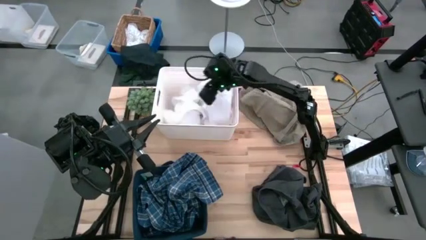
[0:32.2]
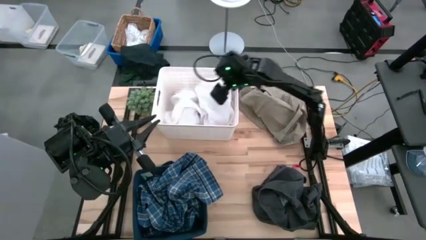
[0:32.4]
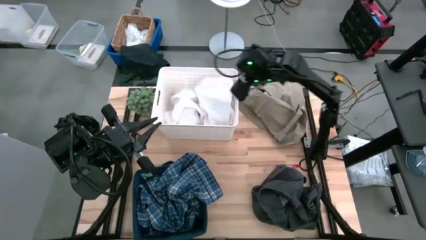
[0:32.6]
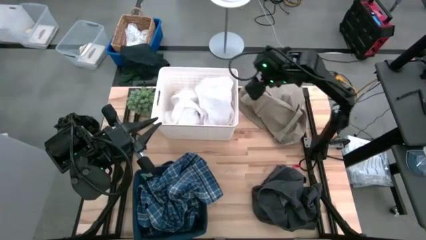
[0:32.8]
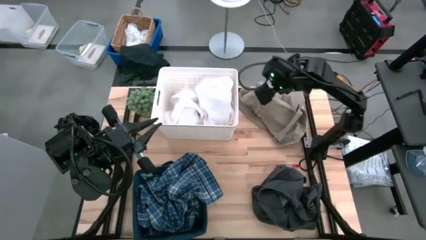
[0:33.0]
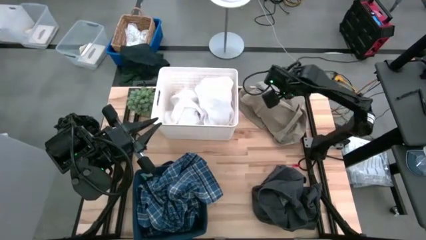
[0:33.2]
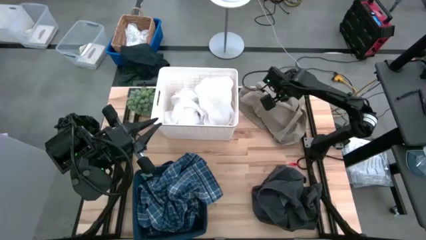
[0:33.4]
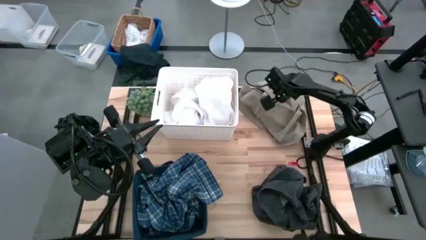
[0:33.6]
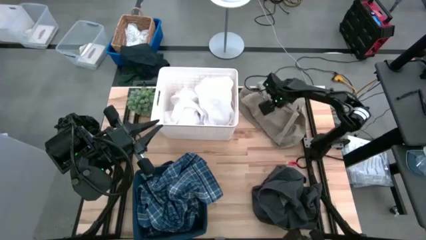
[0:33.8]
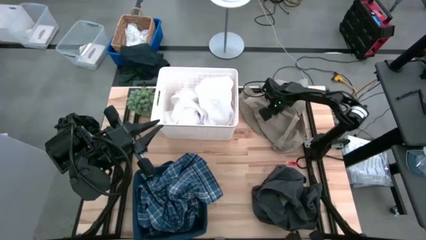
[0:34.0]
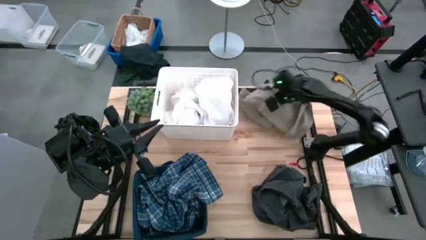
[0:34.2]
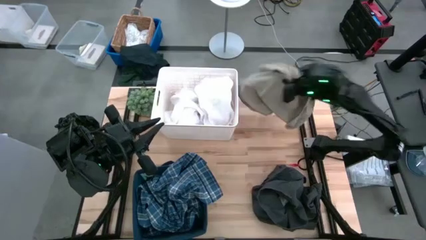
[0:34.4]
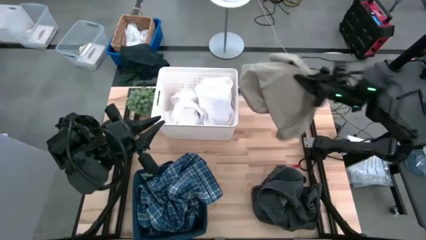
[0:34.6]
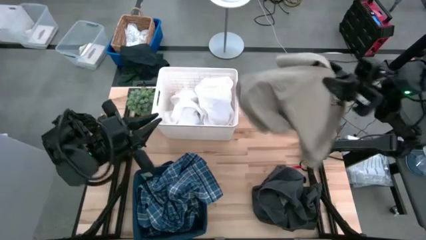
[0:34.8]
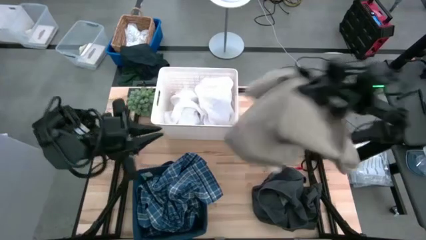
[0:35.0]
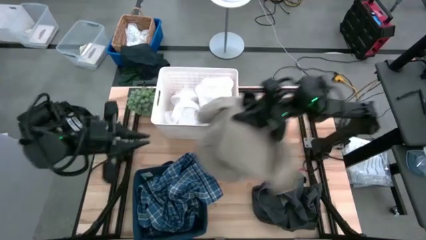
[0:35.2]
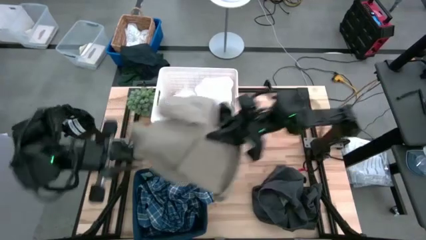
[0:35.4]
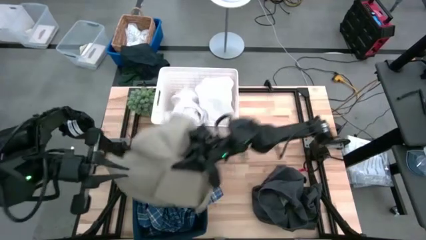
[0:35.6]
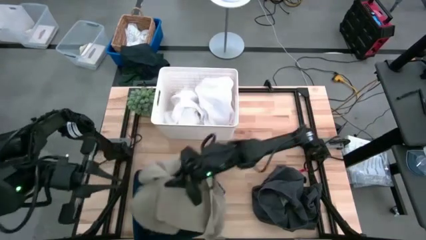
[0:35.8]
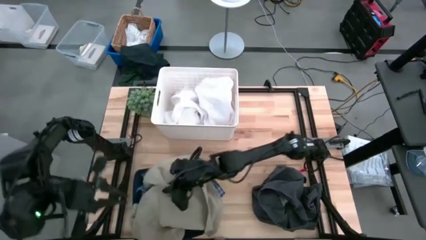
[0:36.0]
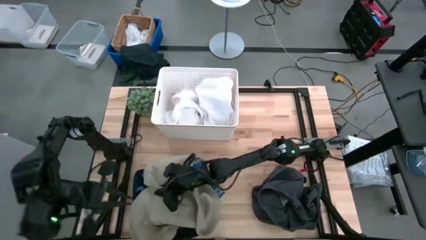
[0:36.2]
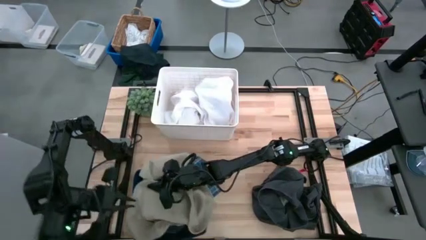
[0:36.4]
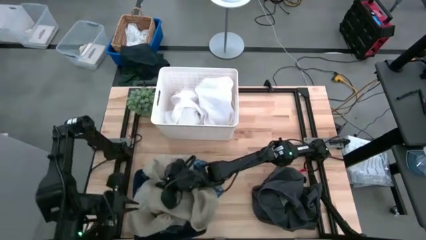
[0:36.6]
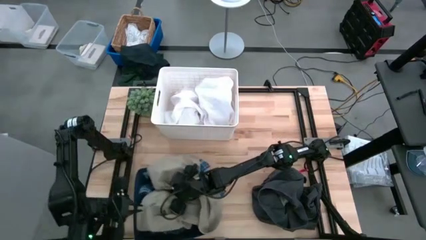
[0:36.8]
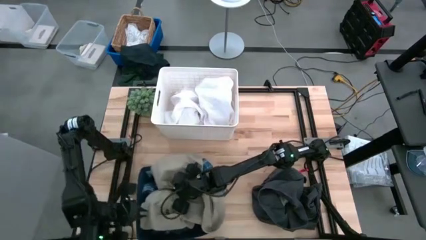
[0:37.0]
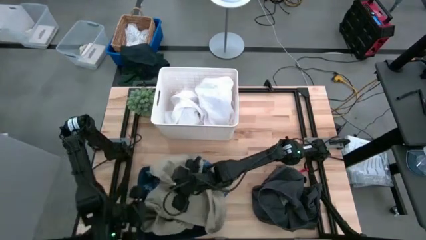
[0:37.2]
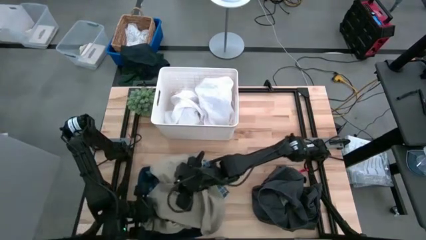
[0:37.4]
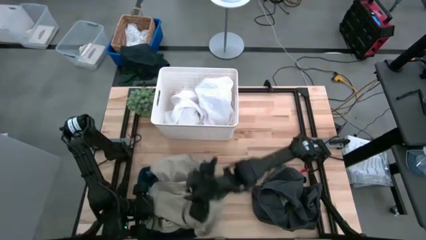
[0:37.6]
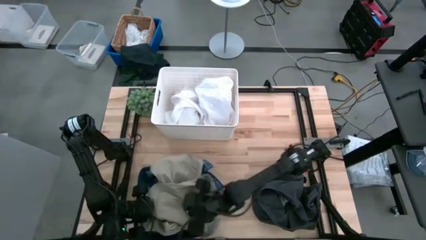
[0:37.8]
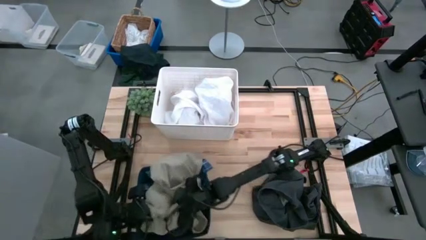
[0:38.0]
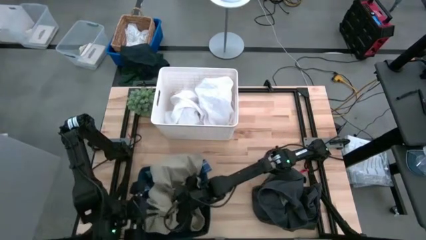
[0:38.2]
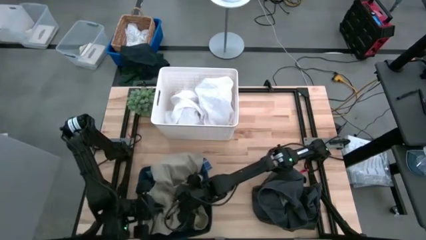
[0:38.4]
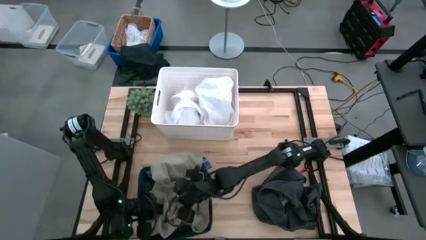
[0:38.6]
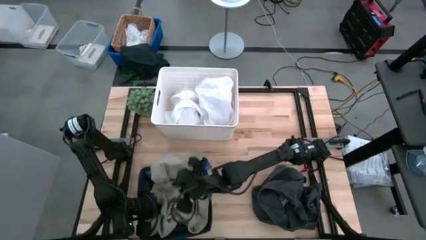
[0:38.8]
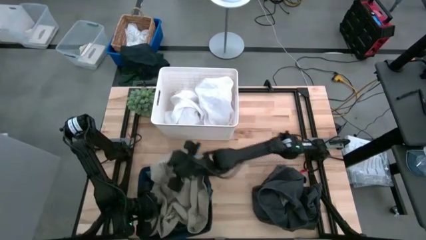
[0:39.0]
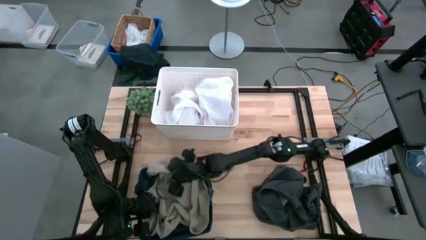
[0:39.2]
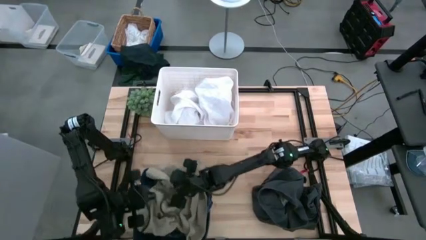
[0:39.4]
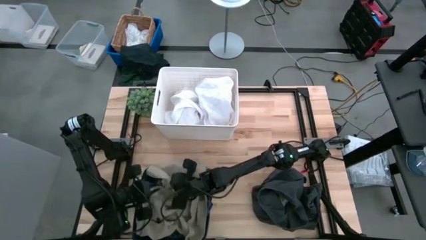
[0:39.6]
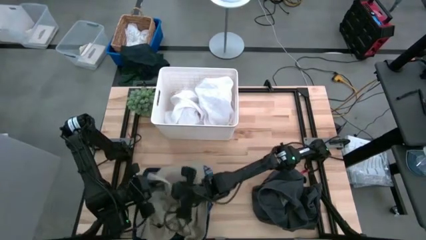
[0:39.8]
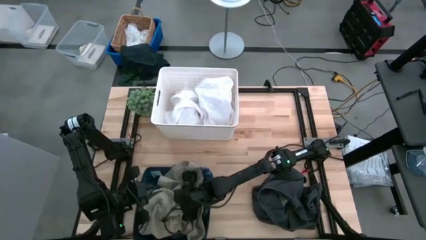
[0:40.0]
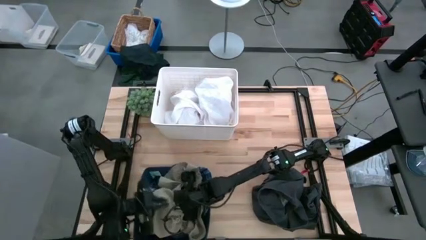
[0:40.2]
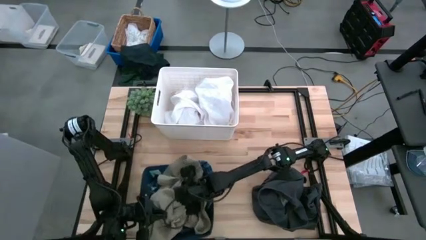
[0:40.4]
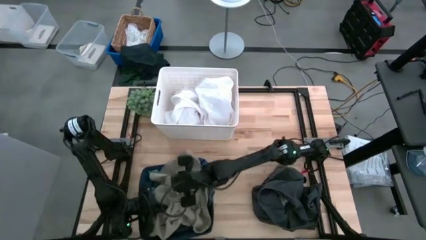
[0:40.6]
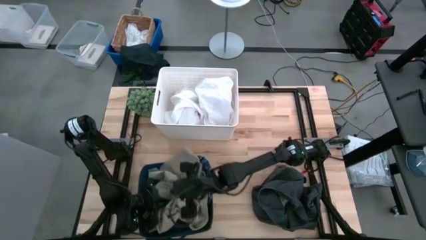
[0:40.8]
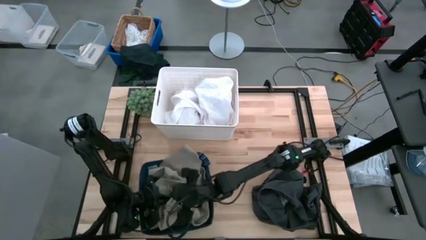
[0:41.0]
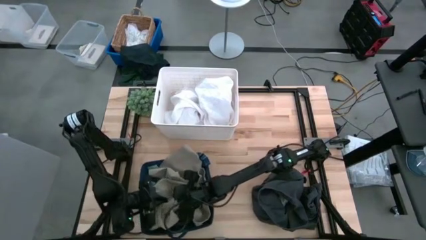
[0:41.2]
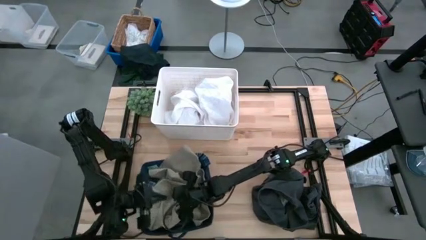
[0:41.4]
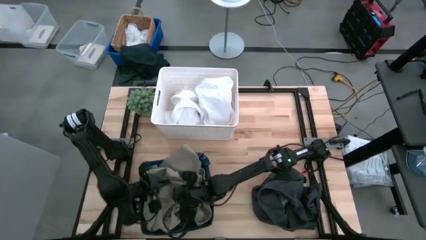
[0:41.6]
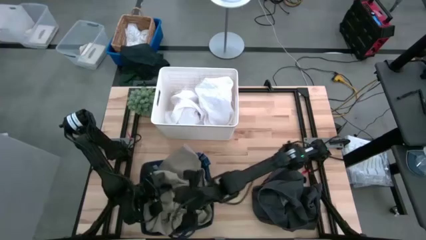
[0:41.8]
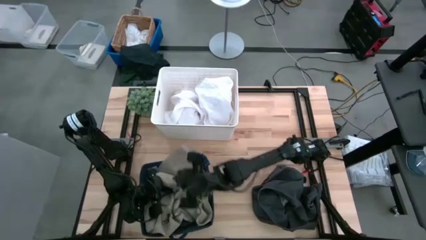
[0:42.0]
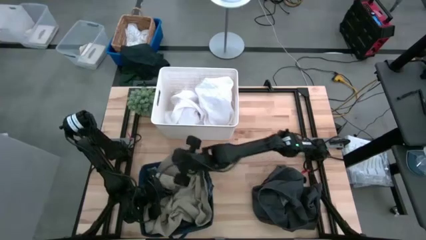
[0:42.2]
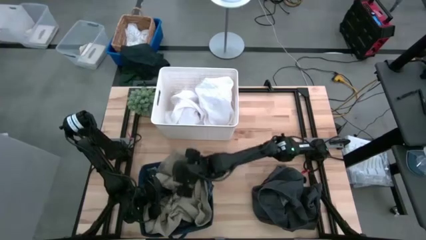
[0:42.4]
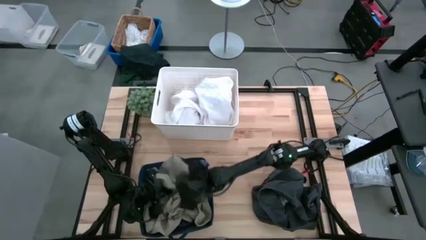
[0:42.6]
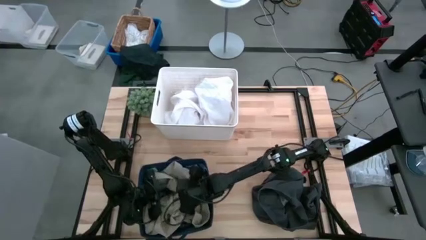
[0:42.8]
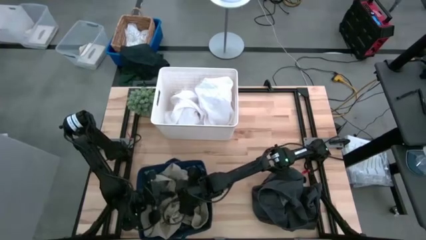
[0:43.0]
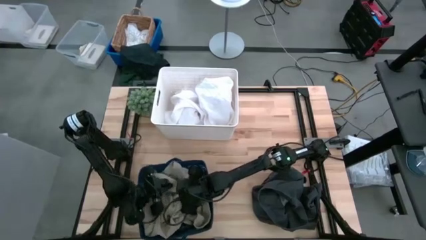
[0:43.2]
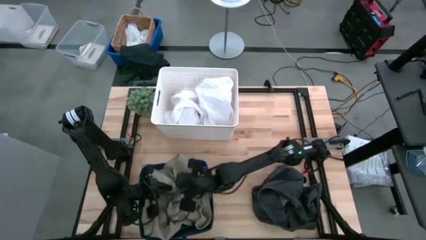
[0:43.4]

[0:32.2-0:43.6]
Task: Sort clothes
Put the brown shorts into the blue laundry organizer

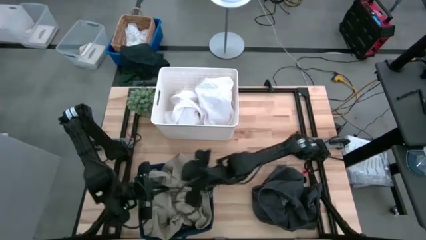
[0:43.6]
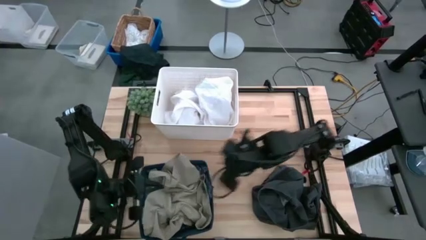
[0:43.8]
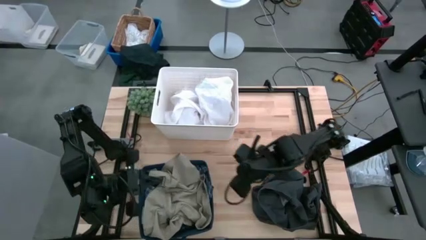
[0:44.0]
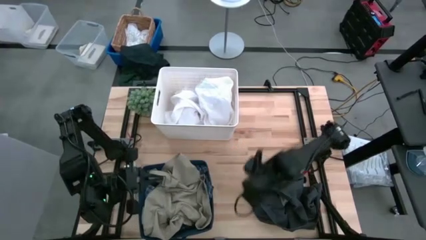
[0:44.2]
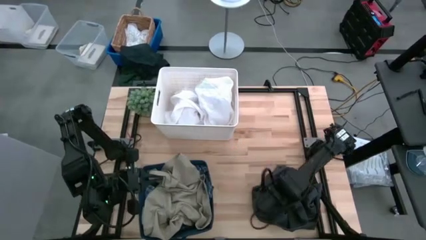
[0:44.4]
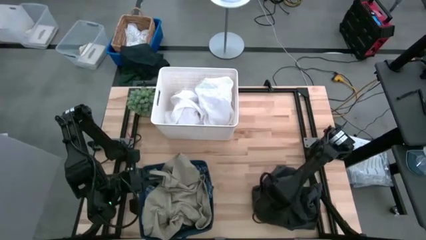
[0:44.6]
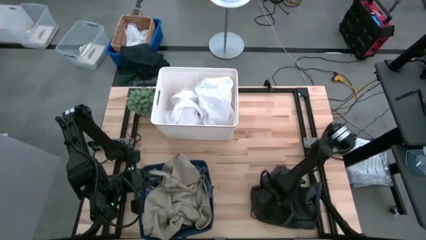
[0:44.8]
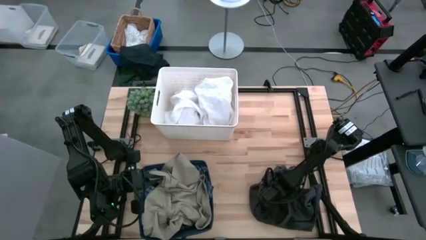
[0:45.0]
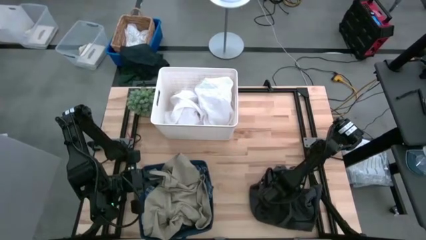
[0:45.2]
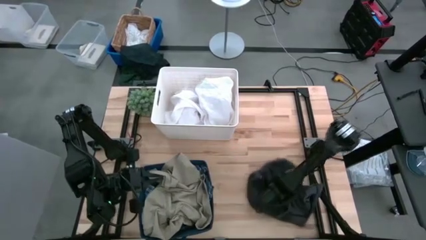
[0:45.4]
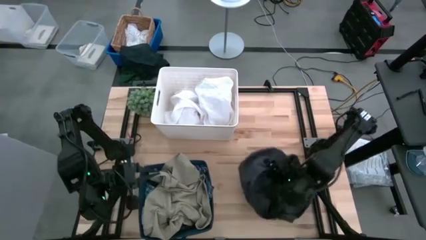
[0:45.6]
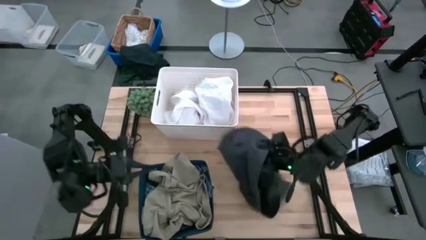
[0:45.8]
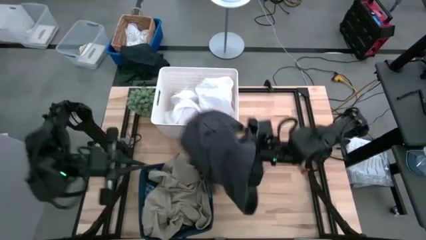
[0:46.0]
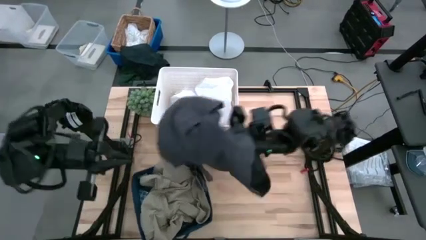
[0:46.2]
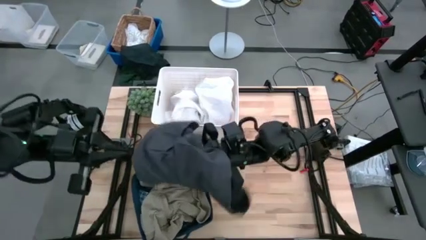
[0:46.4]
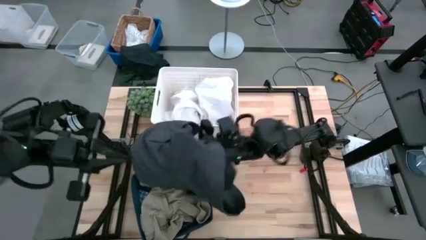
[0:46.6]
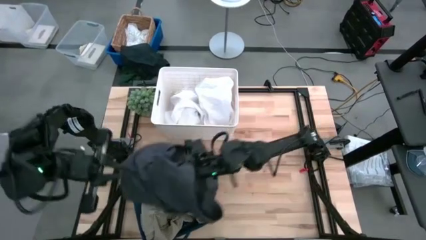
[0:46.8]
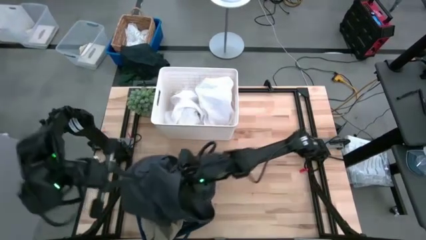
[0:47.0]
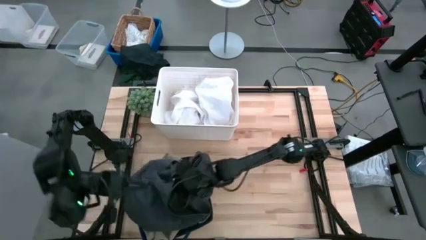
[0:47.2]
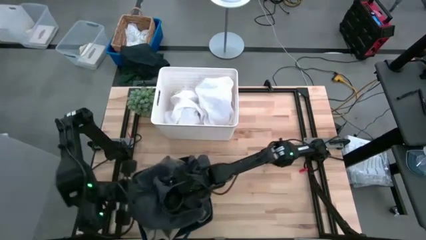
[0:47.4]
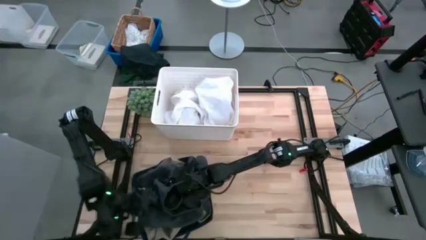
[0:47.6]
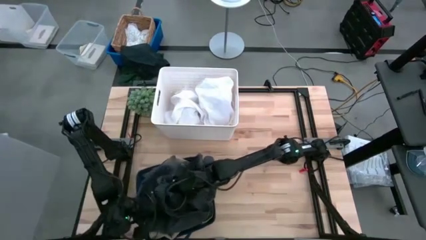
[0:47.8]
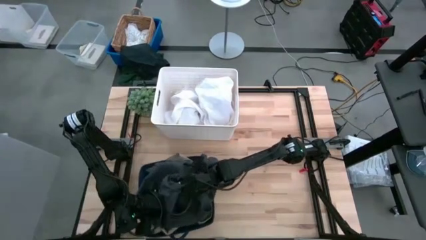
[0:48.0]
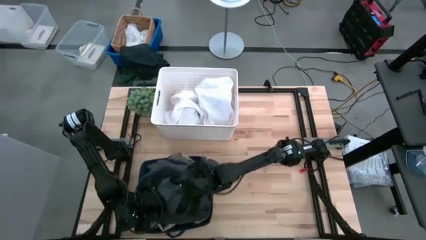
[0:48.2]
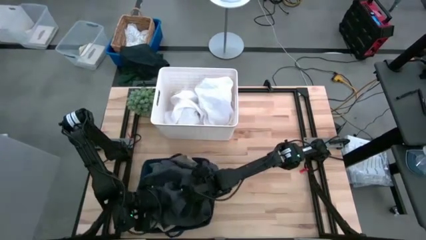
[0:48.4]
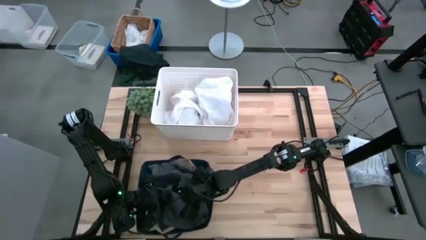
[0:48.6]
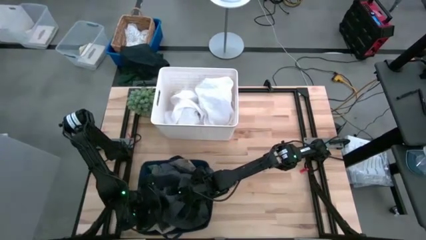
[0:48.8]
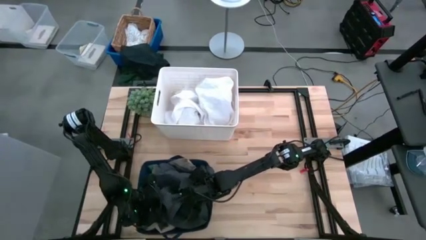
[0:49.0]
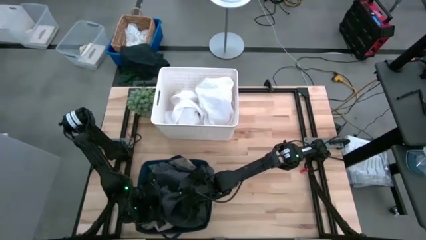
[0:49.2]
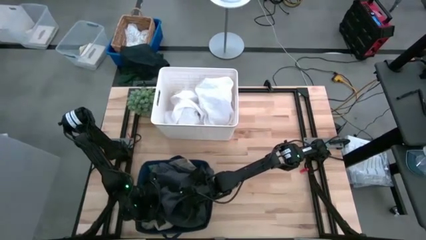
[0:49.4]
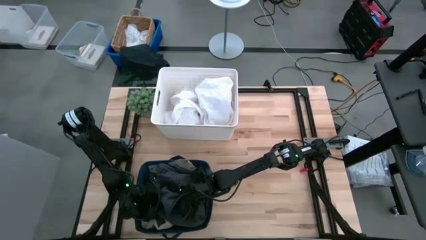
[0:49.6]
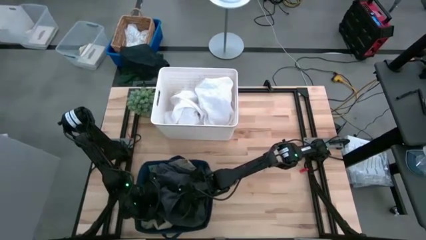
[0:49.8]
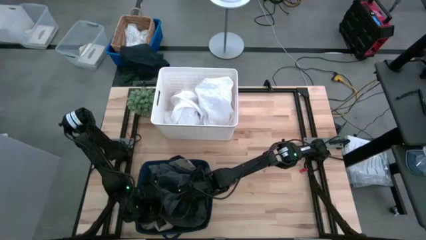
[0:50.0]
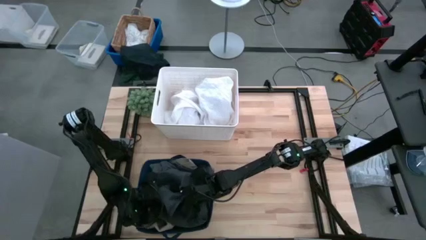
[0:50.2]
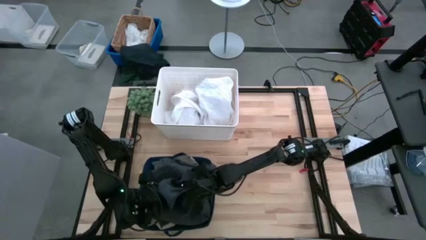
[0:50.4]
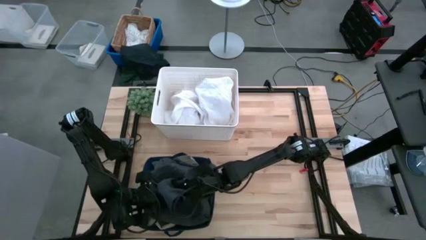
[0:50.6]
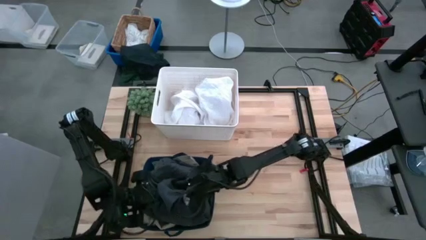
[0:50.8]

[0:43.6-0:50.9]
Put the black shorts into the blue laundry organizer
